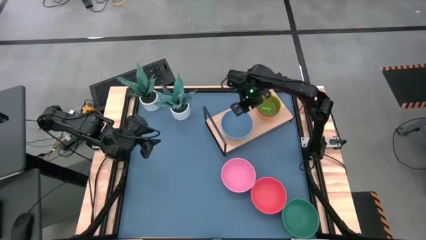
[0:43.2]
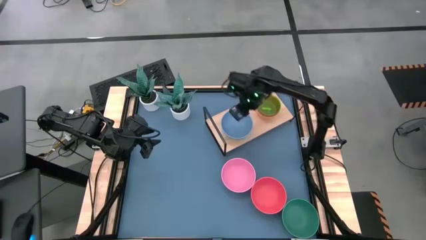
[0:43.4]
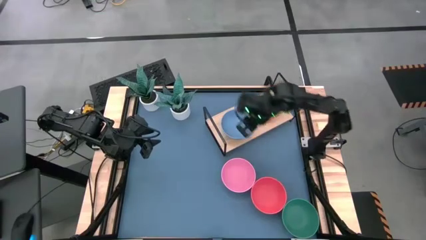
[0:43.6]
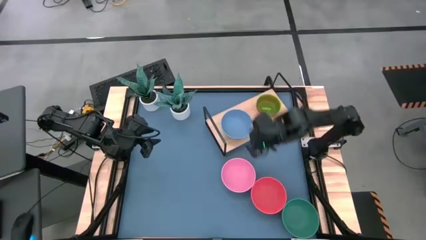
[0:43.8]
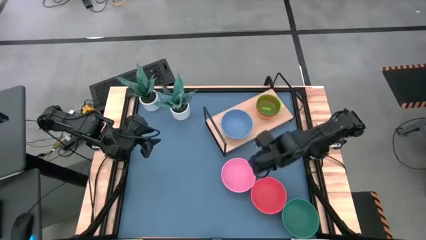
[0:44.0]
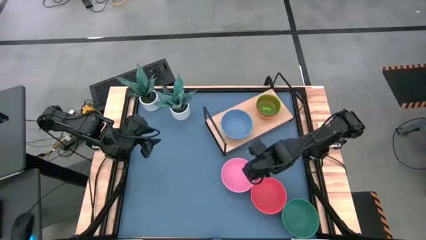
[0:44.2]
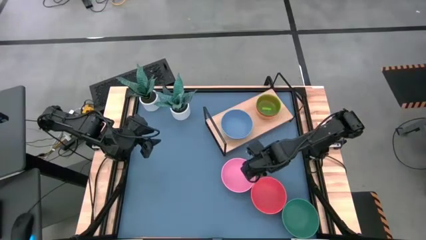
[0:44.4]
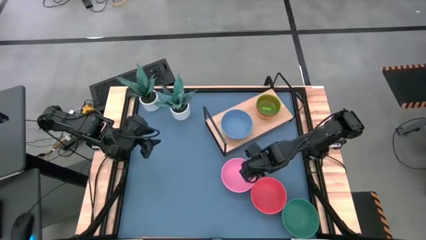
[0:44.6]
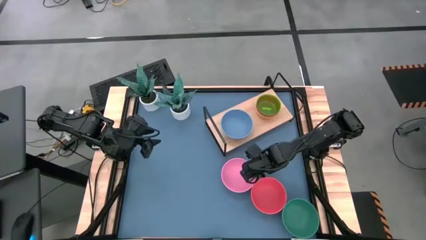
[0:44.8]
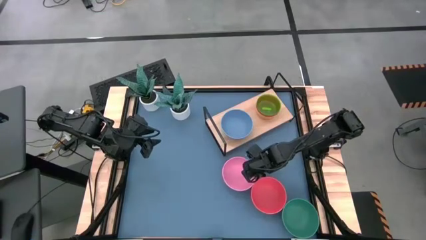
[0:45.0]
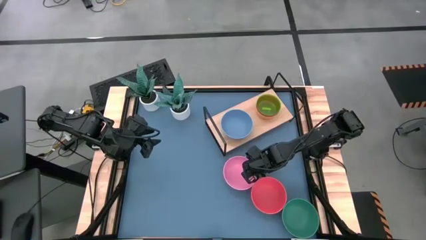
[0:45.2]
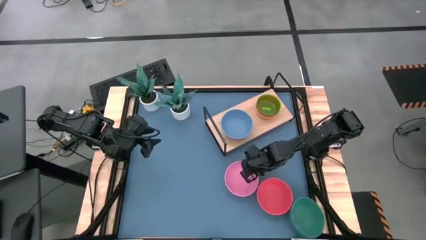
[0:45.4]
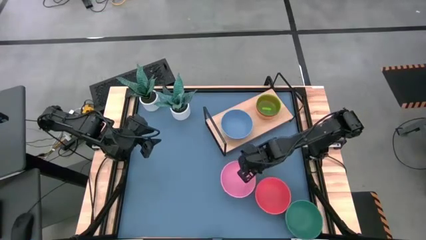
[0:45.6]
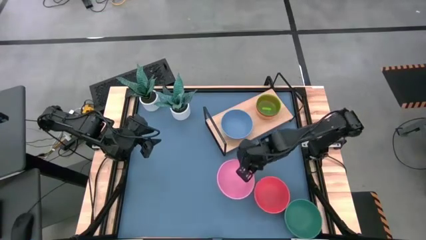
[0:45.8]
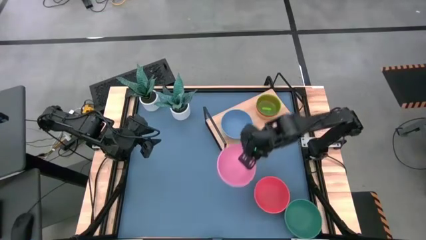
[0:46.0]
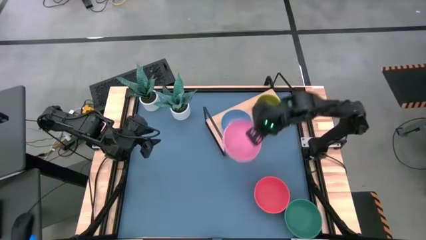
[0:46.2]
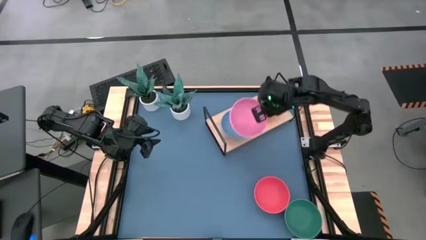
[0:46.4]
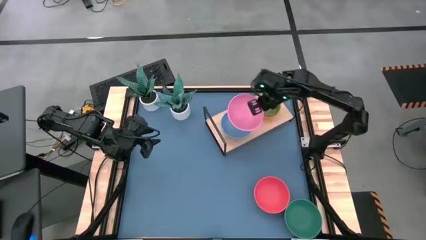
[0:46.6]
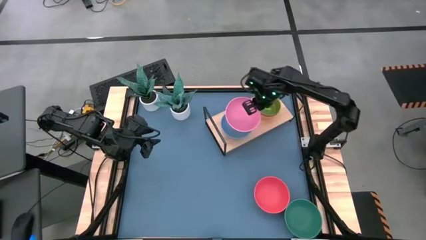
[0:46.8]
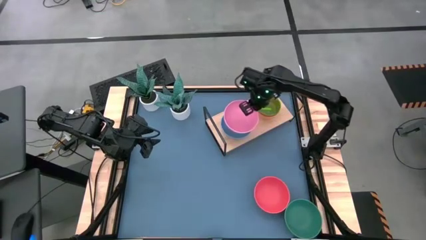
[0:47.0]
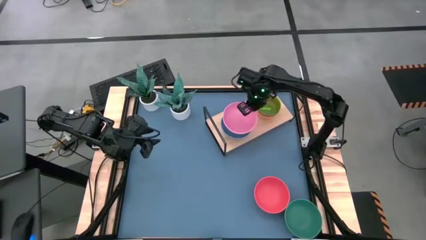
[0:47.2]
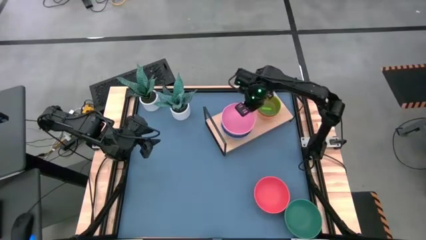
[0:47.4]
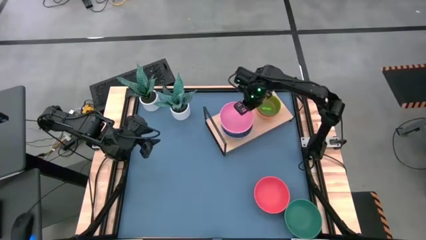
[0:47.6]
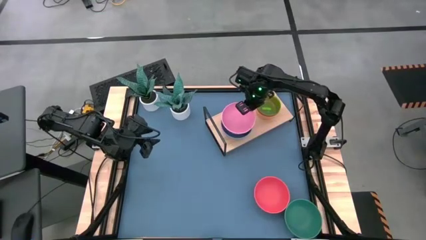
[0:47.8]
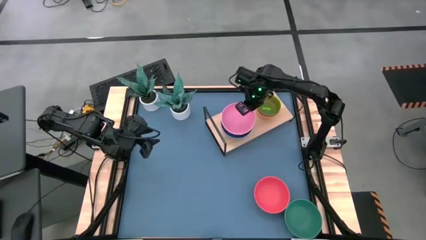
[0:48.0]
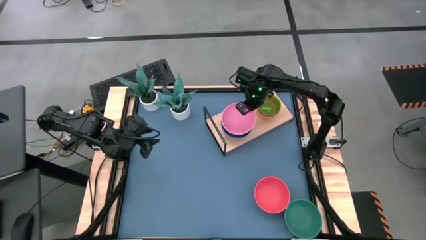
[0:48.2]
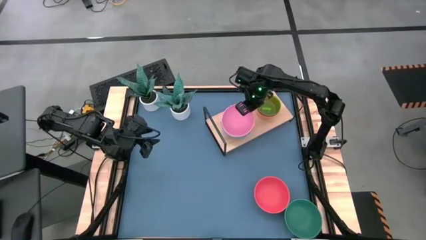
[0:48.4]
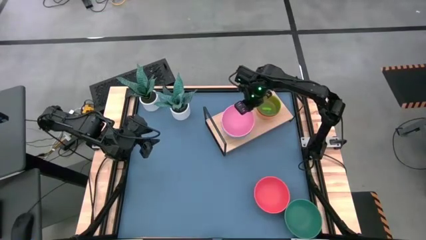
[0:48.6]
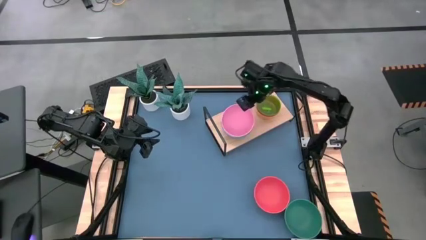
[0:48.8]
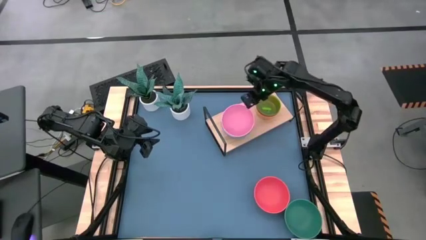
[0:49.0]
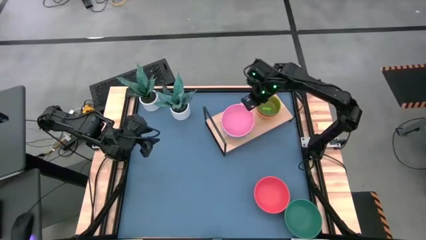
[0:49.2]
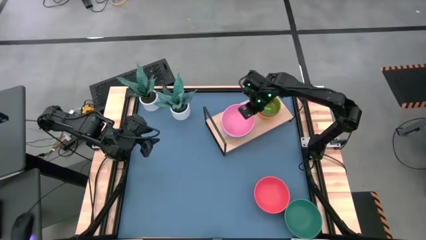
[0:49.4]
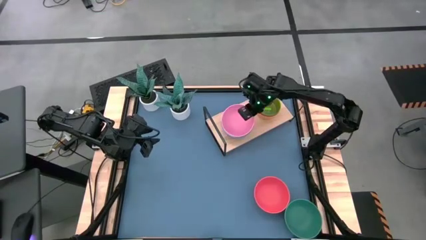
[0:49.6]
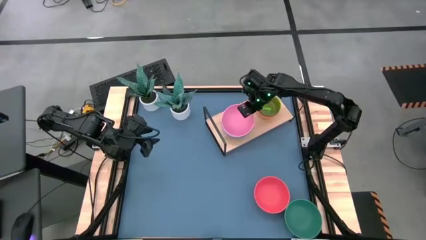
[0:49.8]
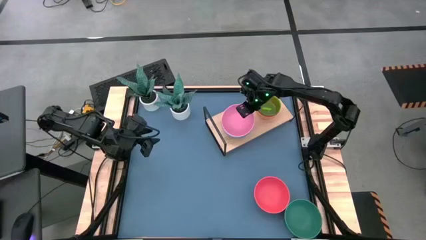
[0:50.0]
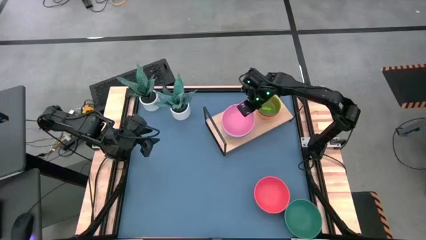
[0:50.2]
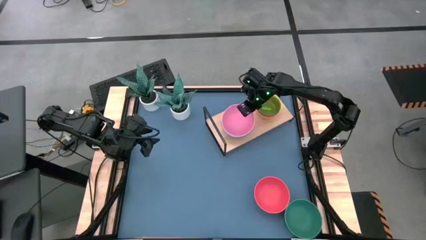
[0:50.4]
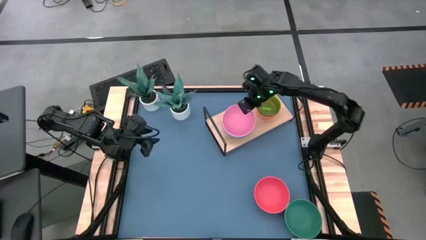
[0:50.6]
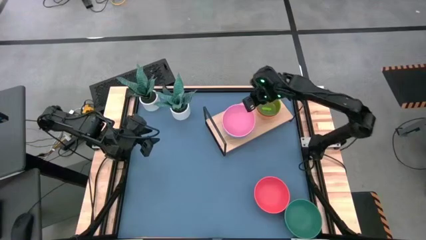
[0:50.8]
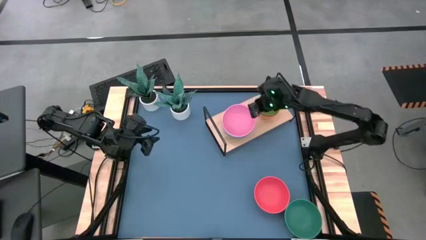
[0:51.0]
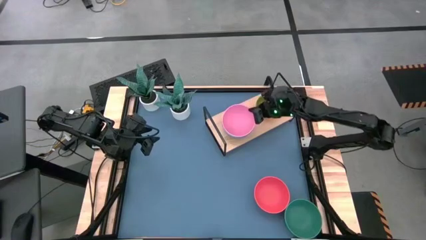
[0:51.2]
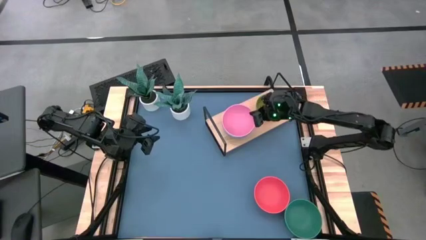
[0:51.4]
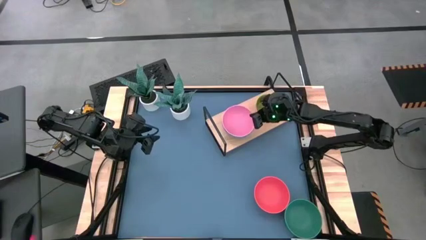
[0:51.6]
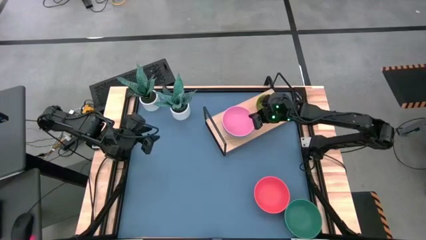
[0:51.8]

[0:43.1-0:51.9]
Task: Place and stack bowls onto a shelf
Stack the large pink bowl on top of the large blue bowl on the shelf

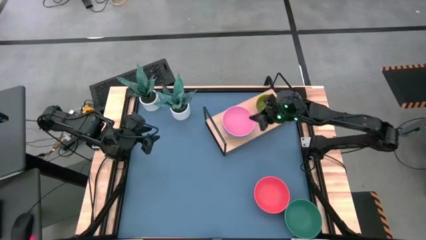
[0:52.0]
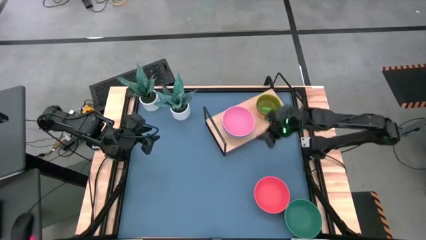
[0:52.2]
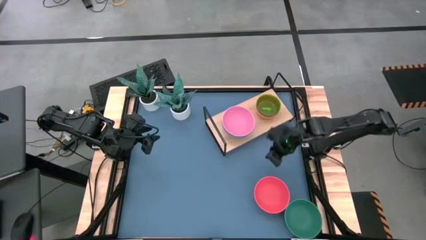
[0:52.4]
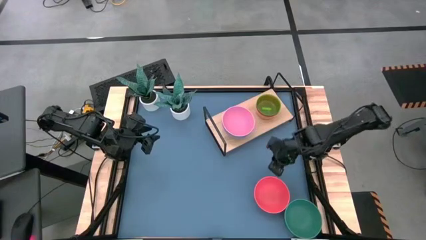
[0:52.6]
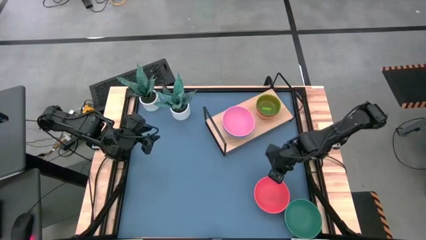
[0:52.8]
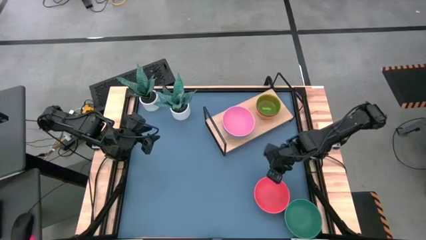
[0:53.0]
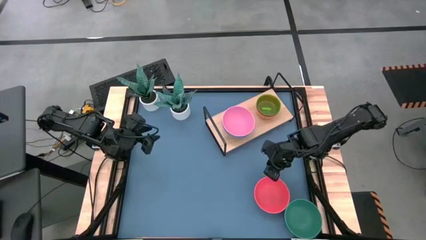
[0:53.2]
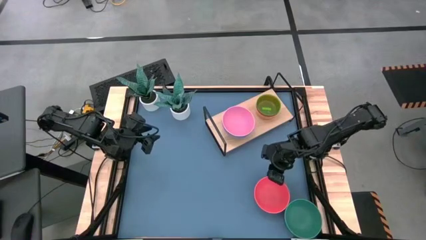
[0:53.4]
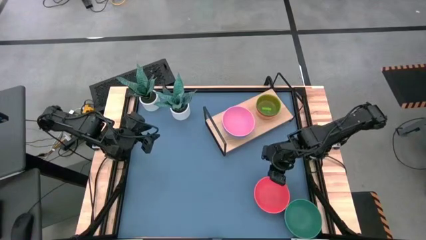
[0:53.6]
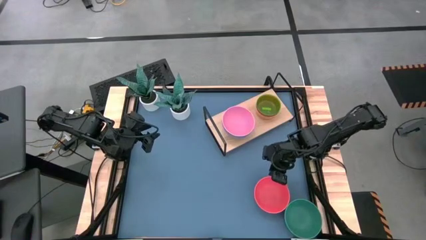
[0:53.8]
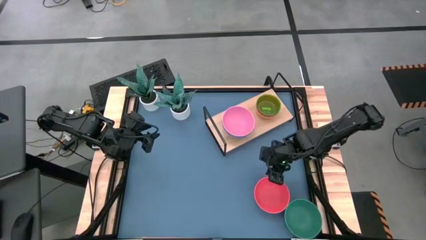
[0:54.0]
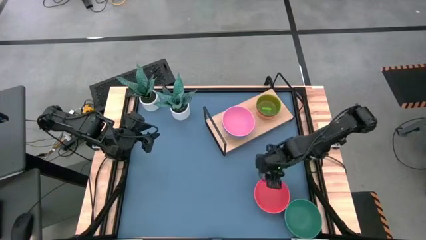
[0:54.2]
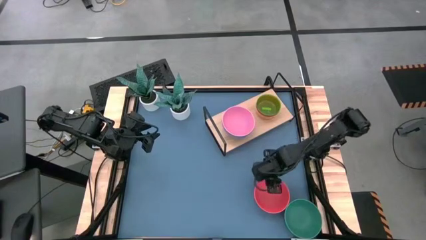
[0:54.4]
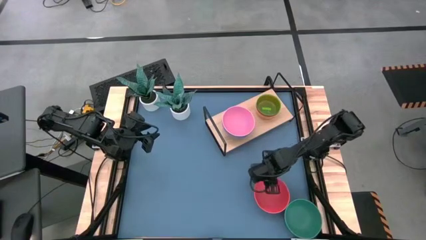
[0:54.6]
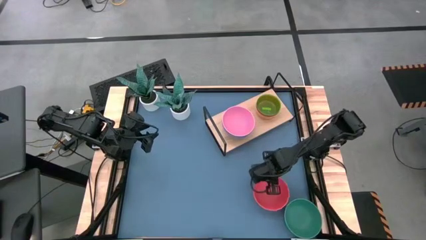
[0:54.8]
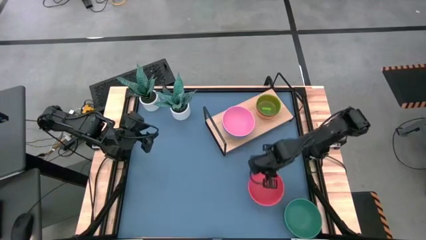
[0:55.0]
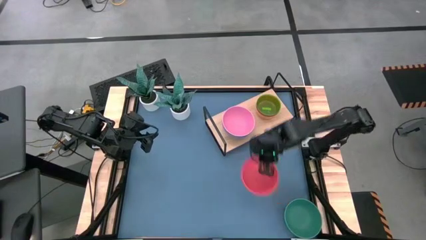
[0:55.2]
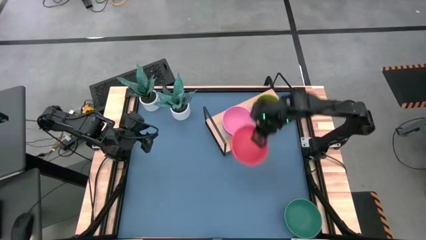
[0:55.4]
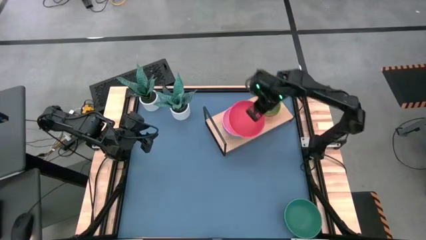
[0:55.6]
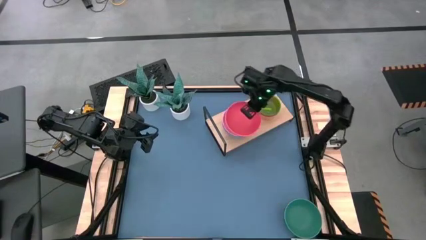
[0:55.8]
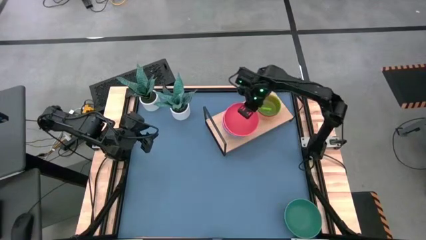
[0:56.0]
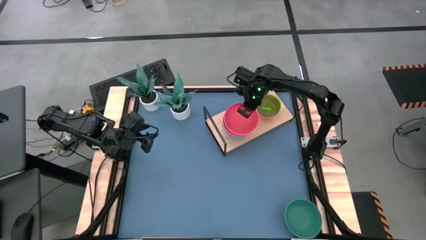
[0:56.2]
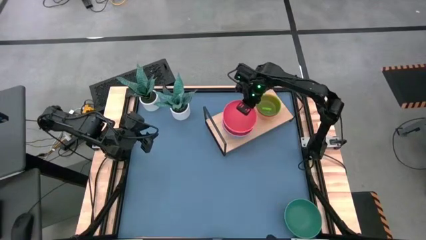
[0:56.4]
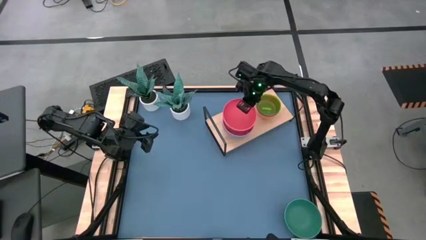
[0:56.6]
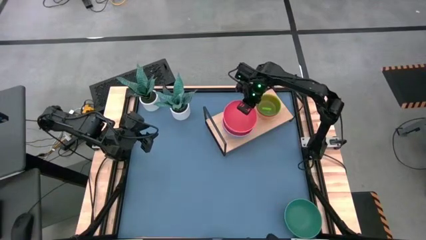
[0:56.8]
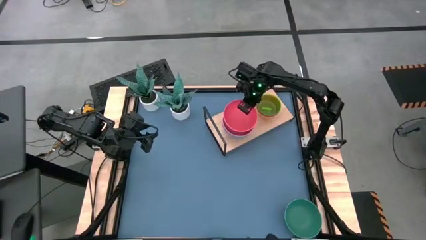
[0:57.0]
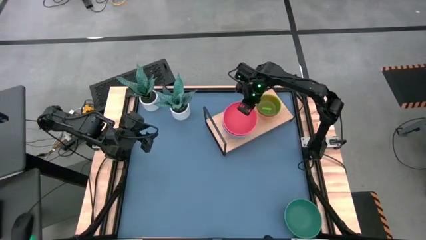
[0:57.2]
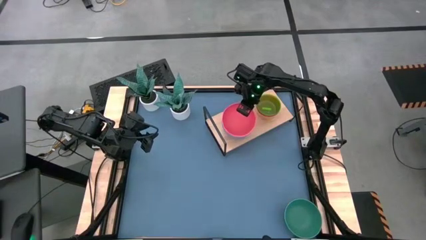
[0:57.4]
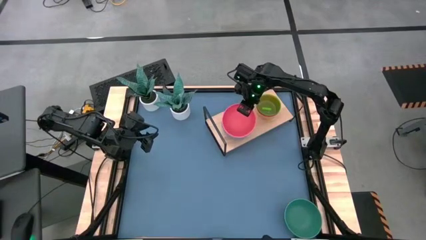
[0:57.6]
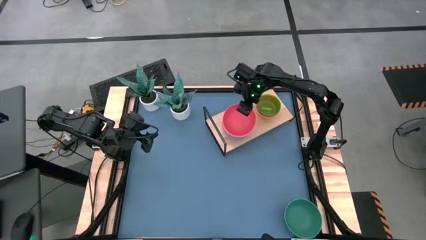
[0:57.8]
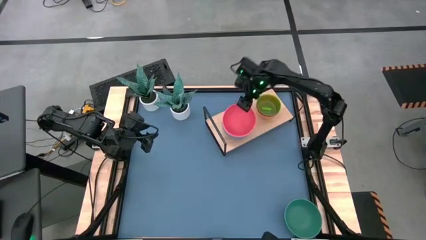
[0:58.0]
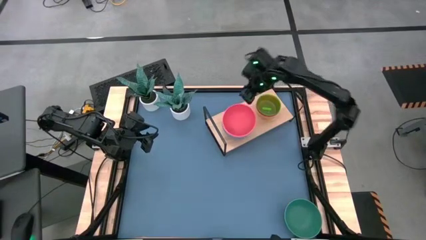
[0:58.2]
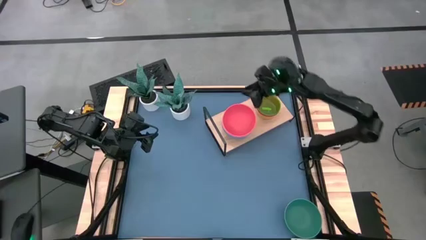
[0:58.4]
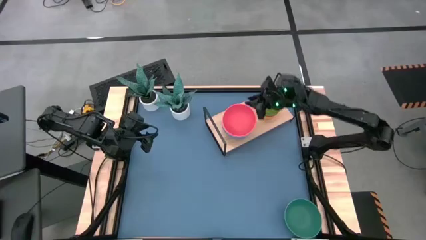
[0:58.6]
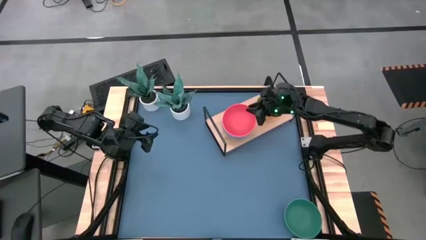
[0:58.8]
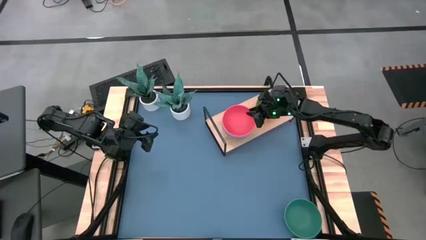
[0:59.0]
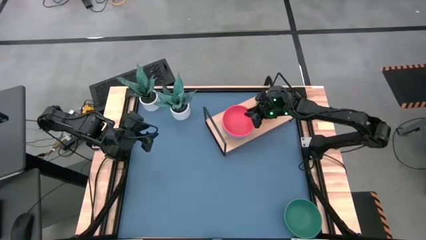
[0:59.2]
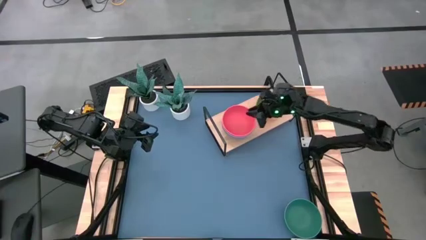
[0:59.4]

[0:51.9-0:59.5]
Stack the large orange bowl on top of the large pink bowl on the shelf

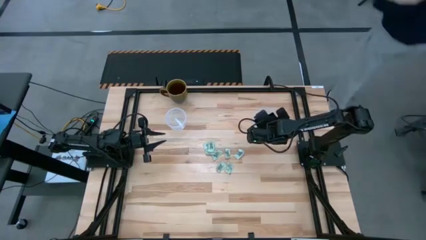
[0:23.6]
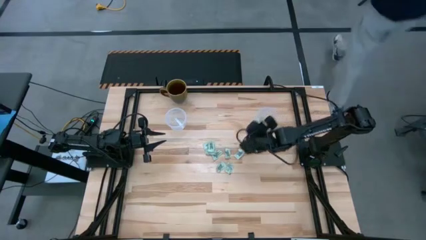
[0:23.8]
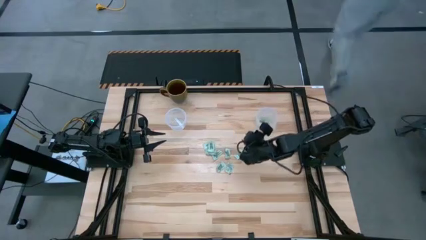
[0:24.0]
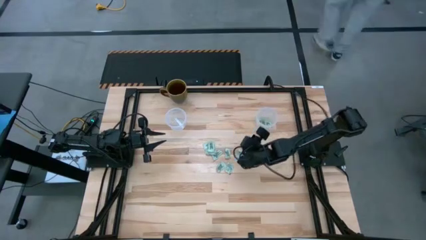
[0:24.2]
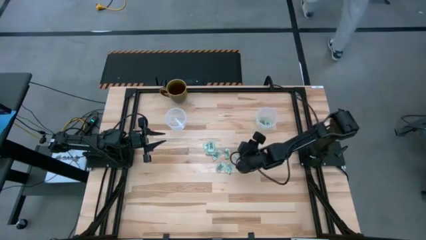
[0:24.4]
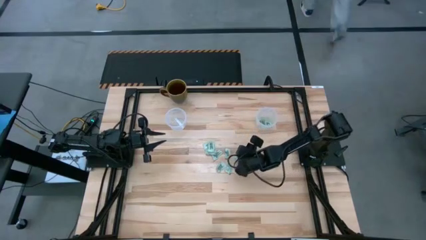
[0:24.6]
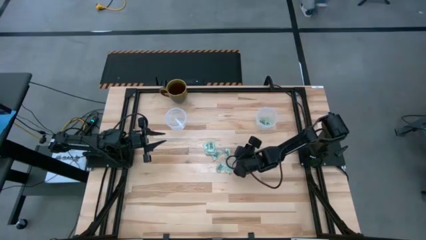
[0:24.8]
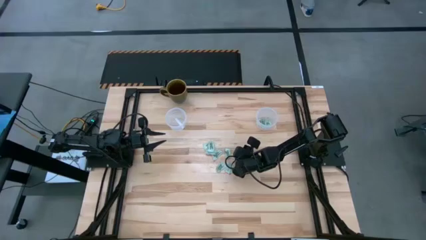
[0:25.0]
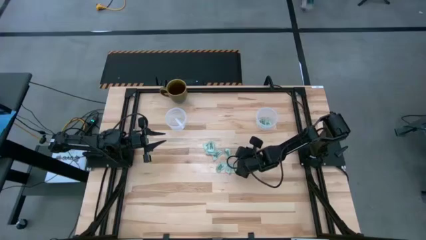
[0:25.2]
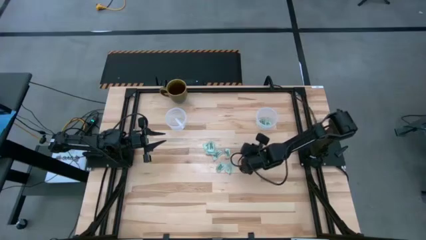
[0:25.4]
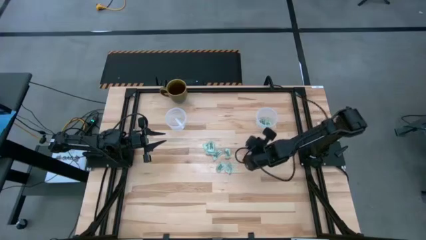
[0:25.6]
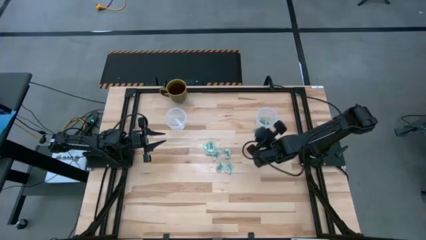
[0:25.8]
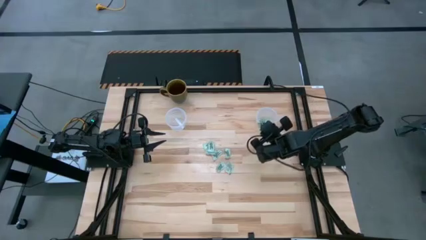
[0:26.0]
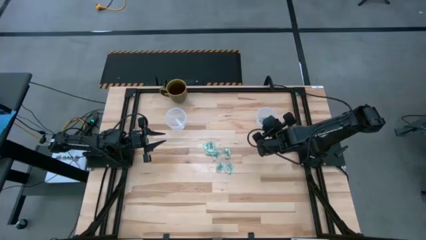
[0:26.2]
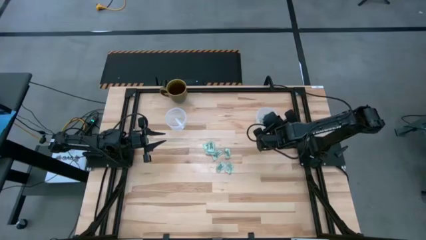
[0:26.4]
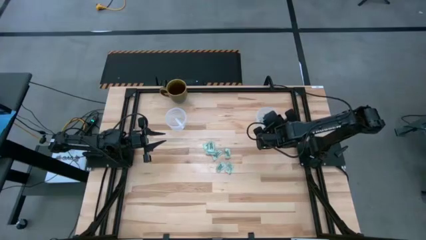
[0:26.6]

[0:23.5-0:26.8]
Task: Pick and place items into bin
Put the stevia packet into the right transparent bin
